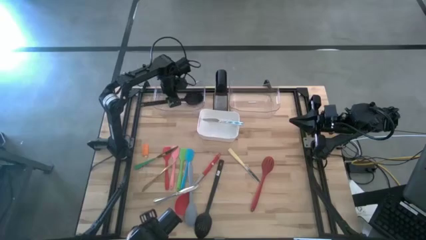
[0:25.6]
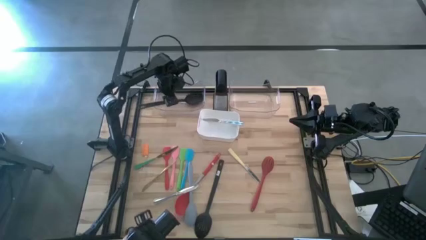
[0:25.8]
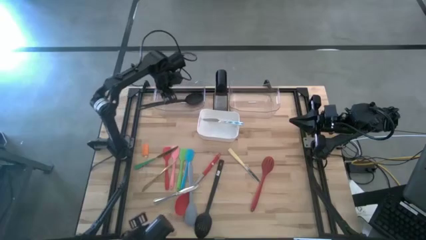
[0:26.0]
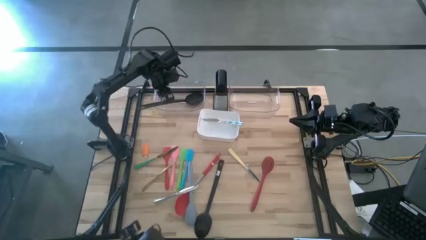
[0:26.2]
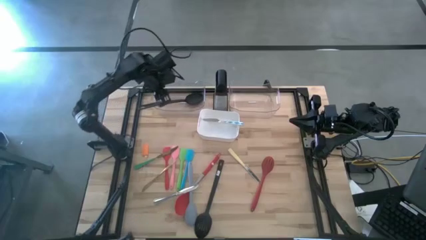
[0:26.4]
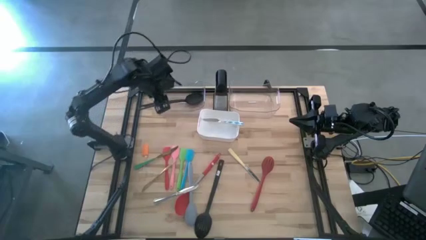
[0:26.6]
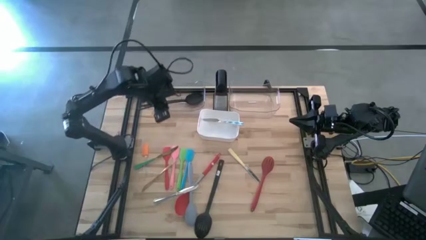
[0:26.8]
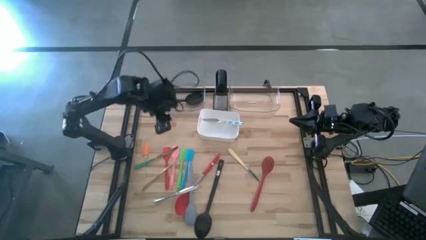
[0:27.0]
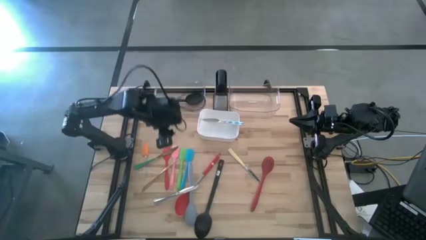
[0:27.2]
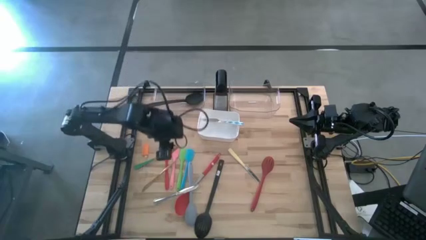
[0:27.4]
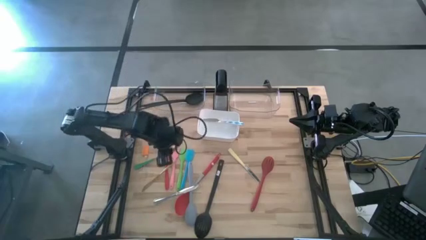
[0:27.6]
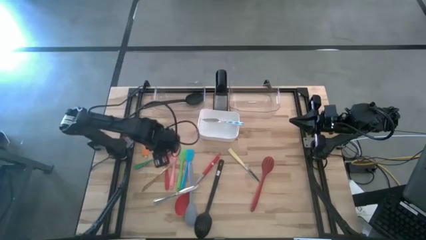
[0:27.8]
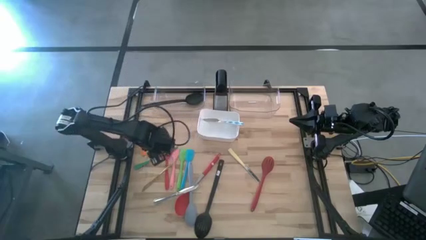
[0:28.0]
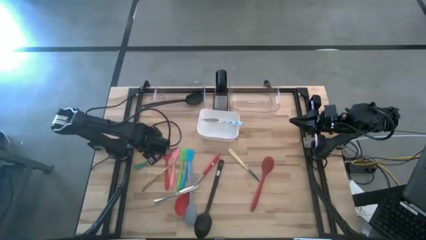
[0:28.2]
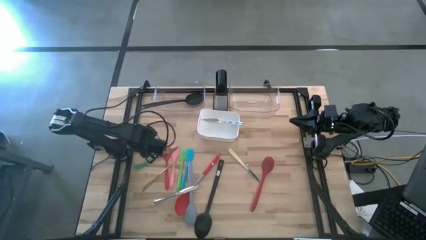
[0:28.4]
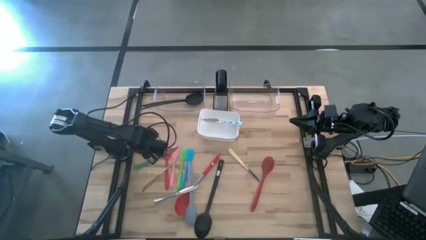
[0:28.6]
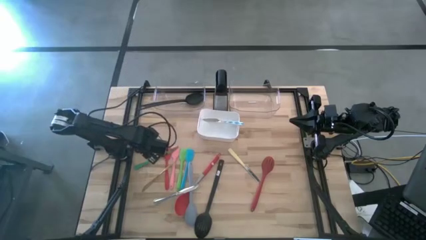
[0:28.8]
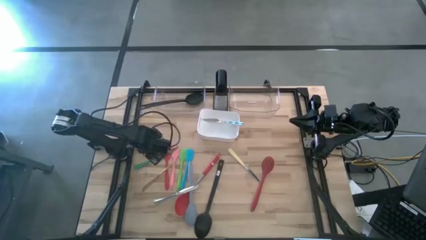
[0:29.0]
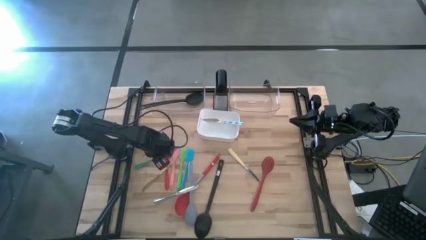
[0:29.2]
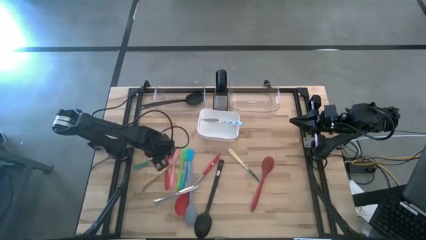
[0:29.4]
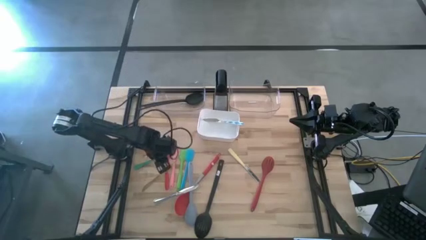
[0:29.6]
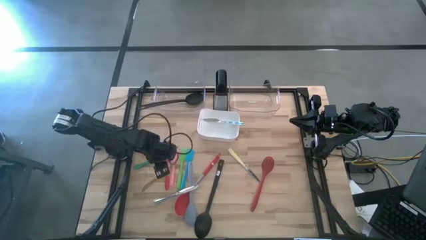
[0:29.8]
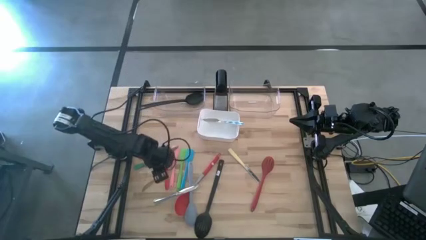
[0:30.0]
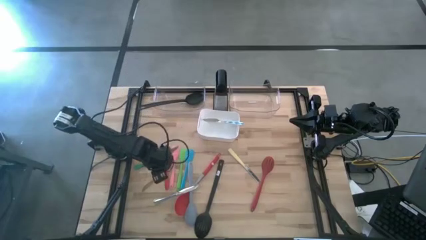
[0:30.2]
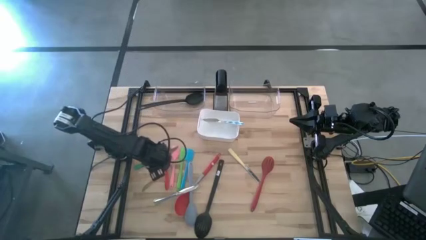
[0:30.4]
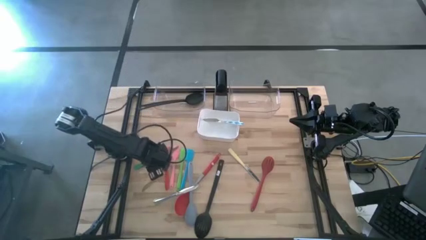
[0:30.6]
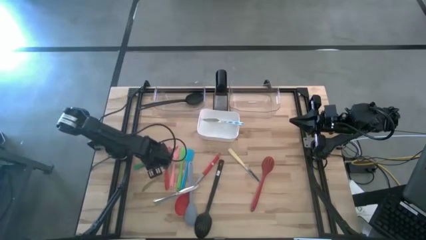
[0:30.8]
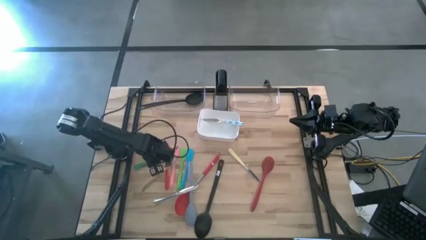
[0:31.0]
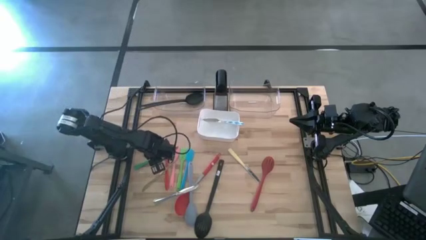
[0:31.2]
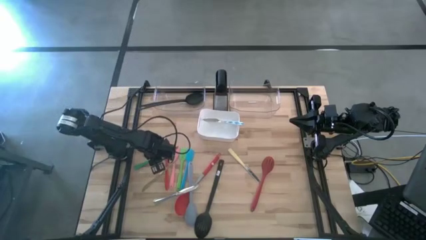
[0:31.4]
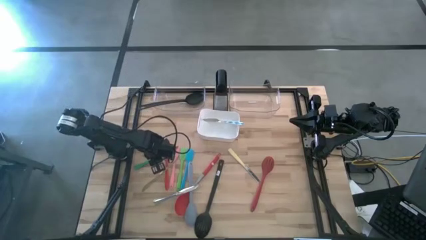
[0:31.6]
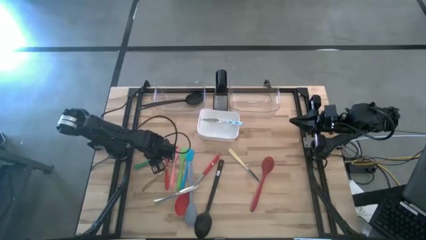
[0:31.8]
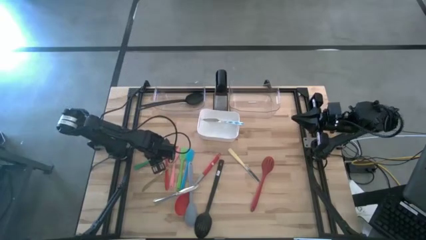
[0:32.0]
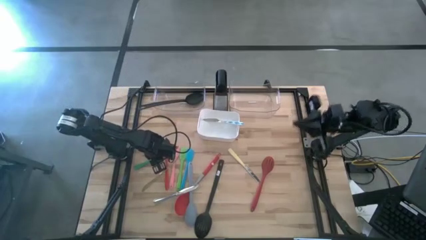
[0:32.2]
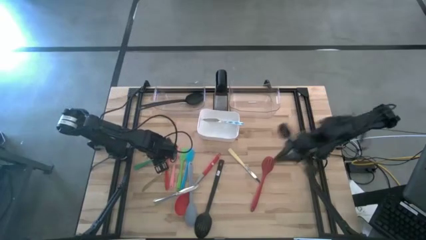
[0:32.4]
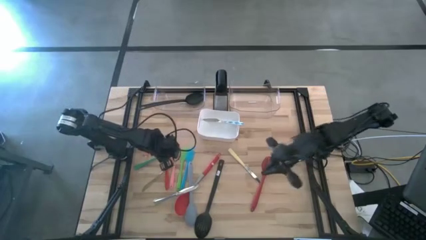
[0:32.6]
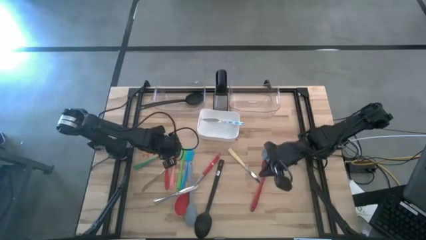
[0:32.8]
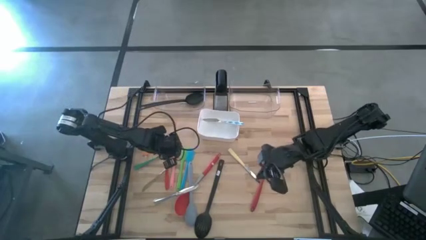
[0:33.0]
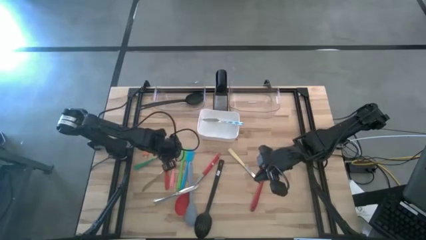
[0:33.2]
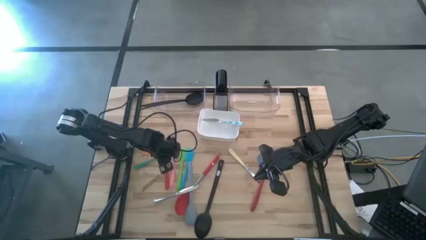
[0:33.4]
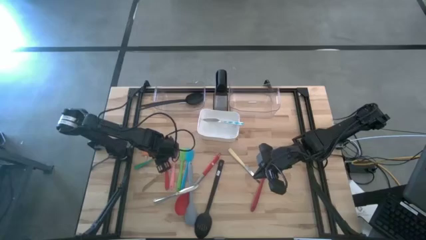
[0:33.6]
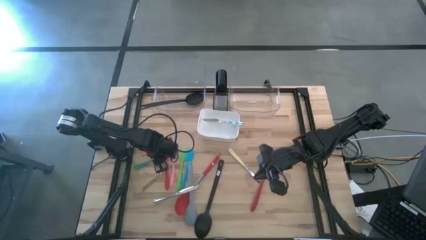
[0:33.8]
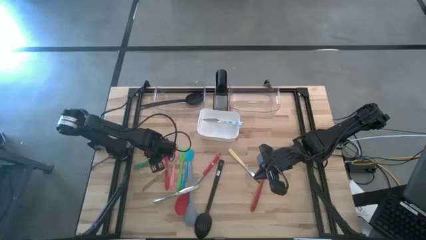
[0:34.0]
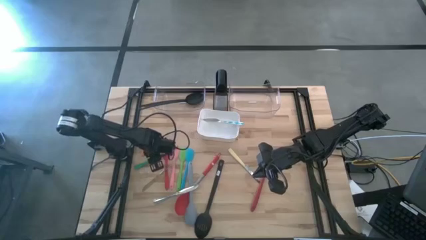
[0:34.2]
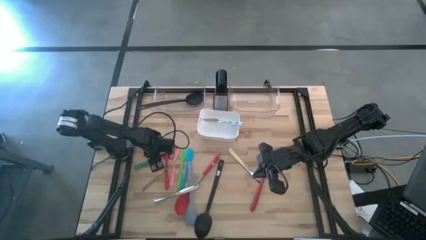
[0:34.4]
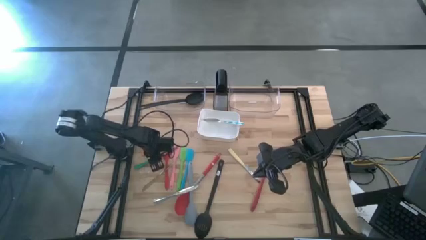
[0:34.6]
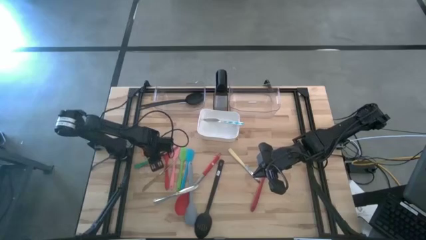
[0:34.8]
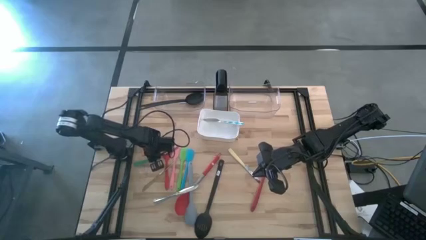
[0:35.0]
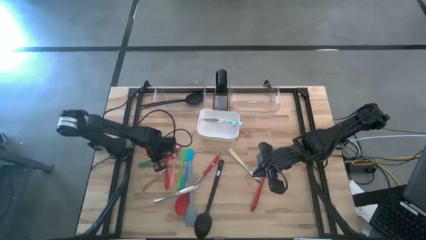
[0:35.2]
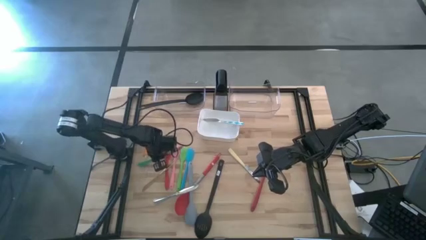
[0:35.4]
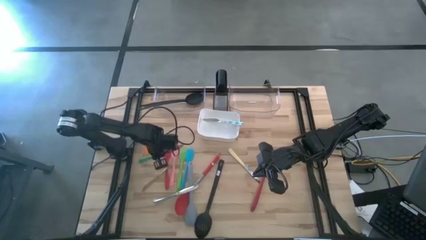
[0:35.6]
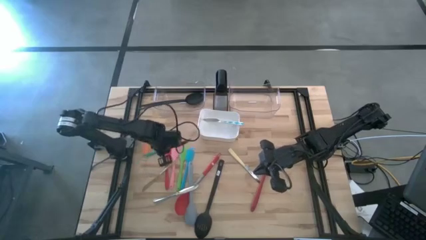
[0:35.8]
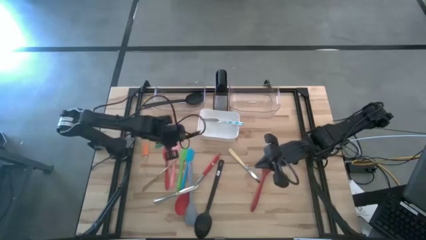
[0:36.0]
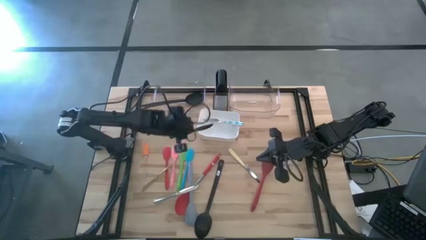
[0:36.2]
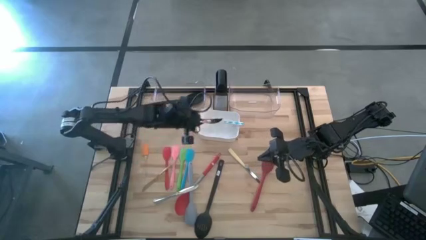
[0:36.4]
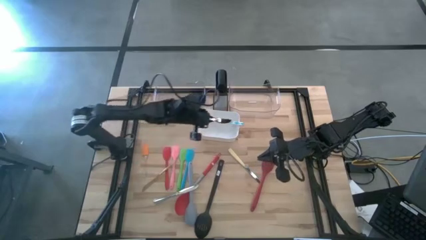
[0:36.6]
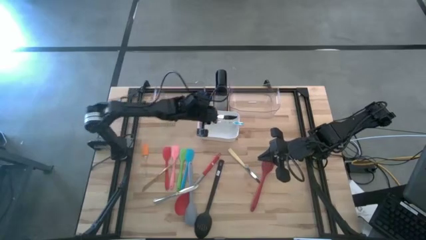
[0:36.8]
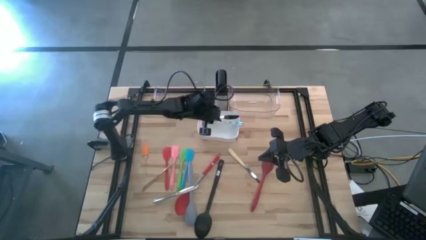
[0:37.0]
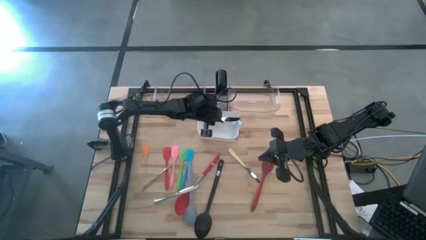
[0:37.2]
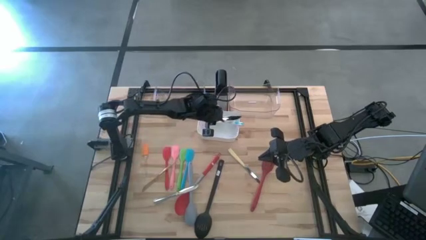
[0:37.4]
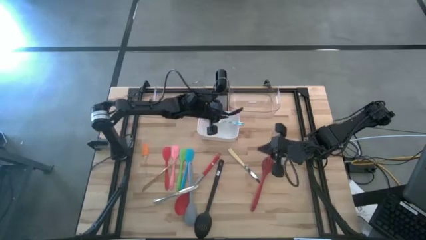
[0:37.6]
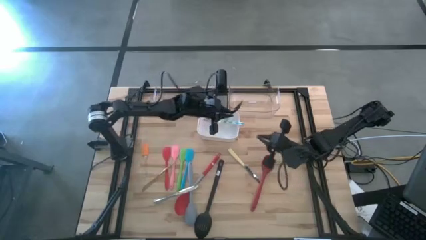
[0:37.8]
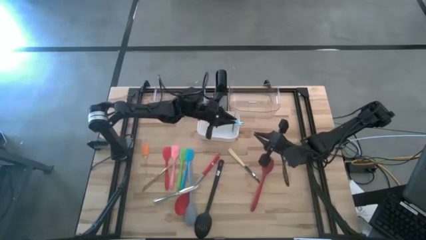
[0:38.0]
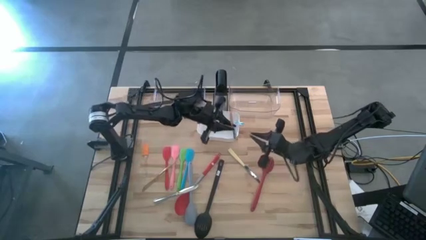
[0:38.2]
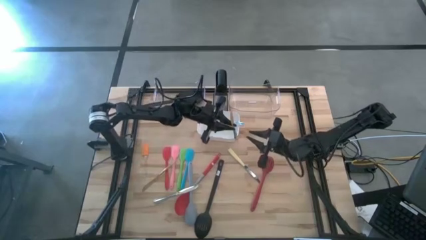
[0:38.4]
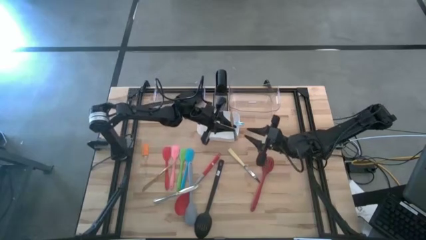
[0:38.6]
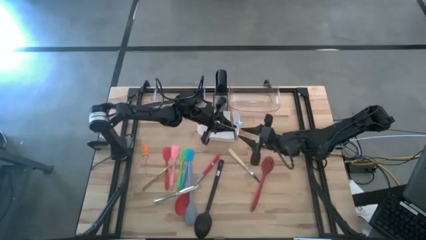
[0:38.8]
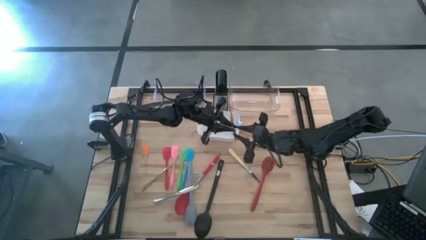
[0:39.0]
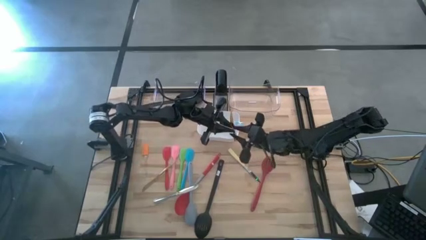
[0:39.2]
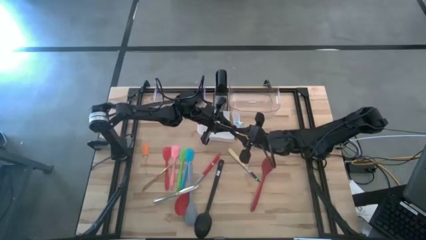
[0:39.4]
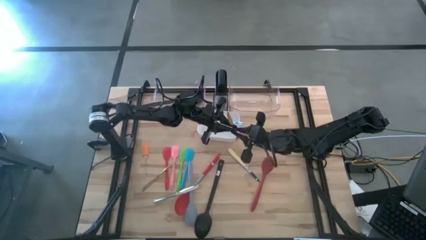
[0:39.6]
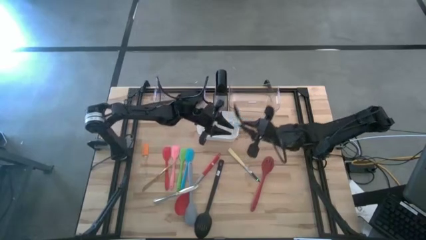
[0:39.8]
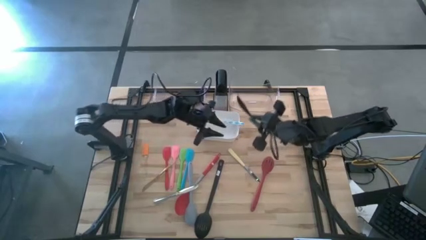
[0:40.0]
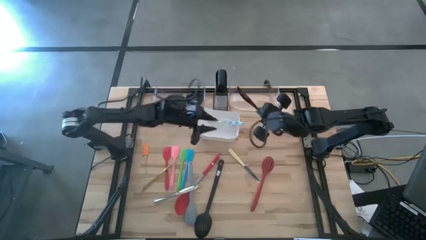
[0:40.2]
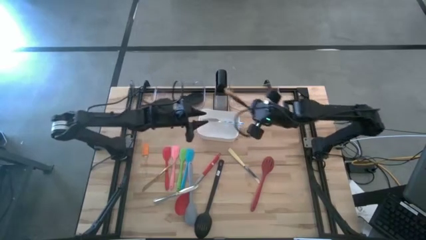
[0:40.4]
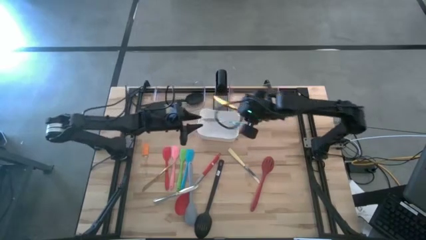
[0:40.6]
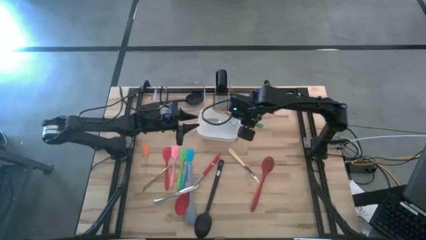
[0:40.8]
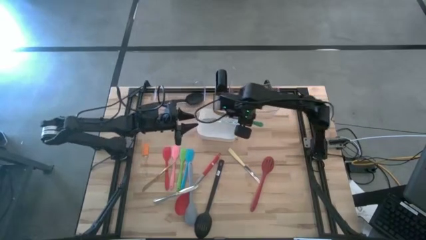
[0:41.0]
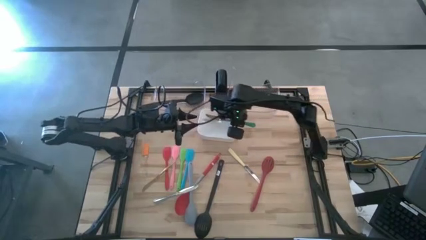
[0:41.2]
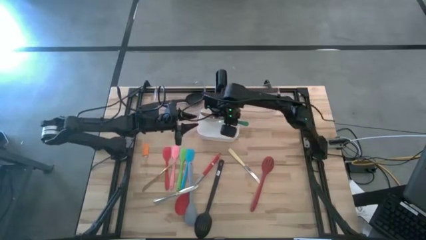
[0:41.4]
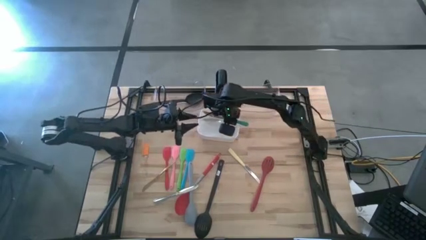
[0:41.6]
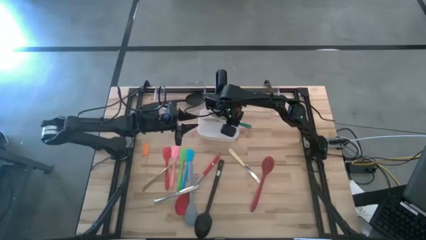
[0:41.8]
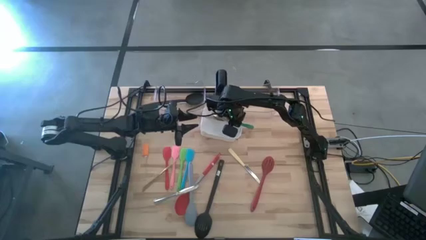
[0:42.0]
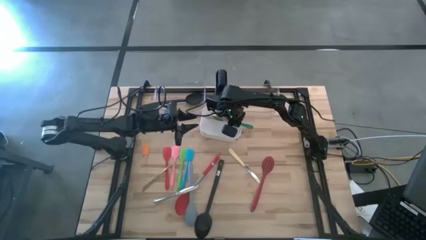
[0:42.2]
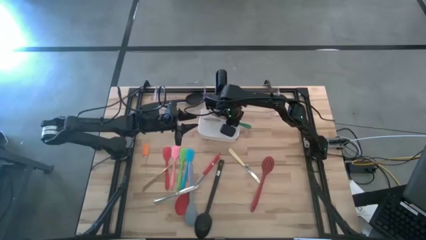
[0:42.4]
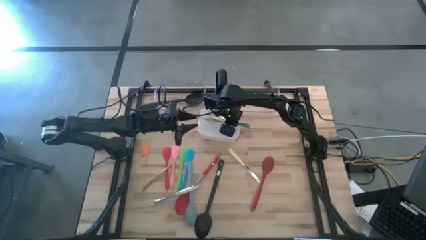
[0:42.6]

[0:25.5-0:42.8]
Task: Pick & Place Kitchen Items
Put the green table knife into the white bin
